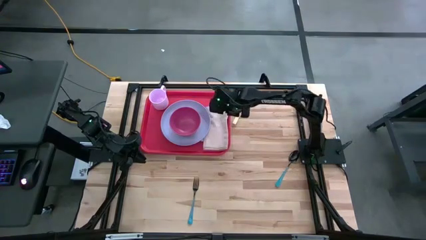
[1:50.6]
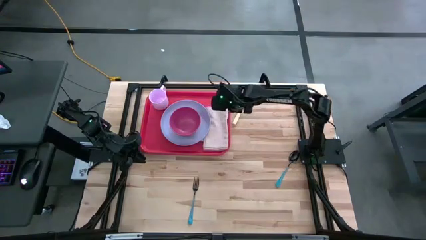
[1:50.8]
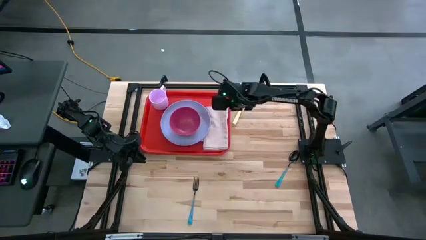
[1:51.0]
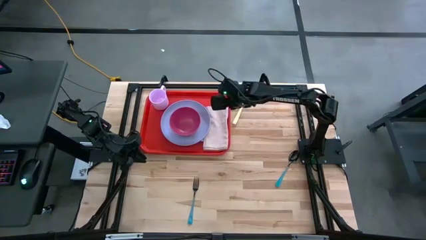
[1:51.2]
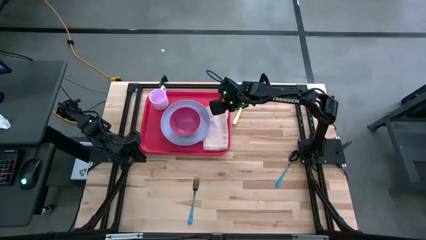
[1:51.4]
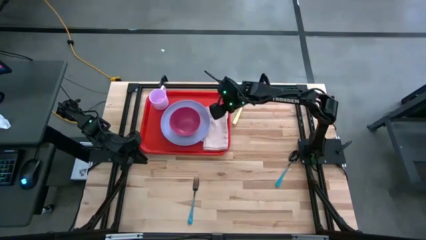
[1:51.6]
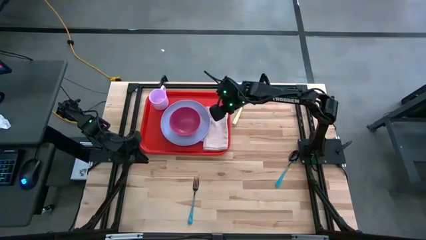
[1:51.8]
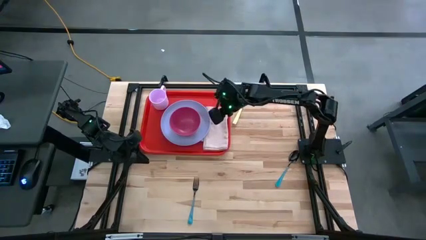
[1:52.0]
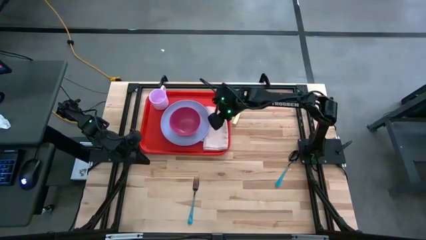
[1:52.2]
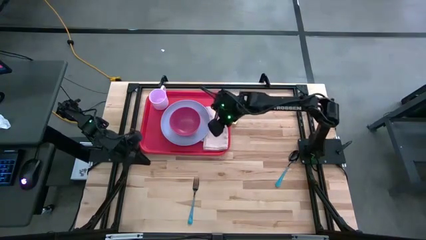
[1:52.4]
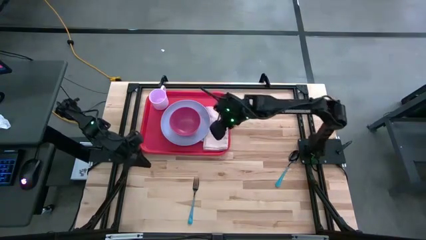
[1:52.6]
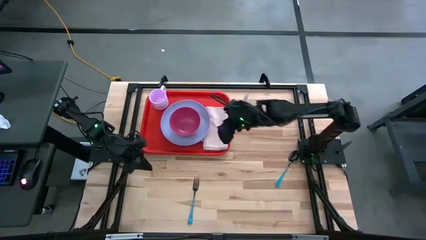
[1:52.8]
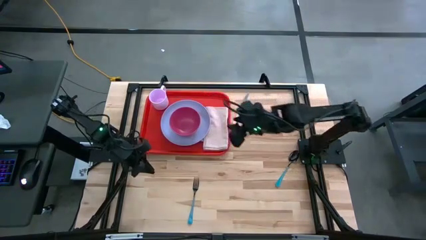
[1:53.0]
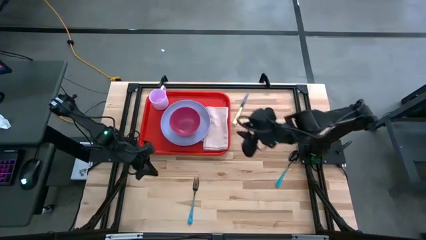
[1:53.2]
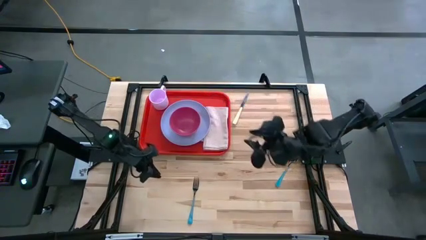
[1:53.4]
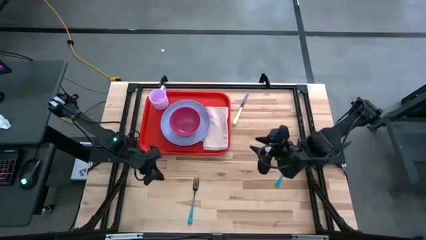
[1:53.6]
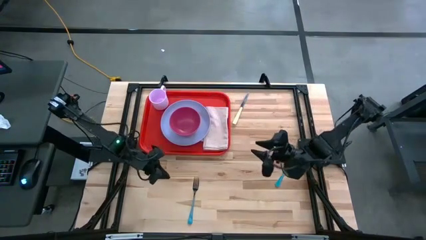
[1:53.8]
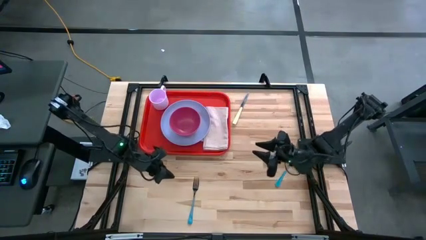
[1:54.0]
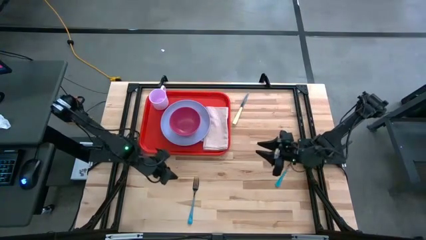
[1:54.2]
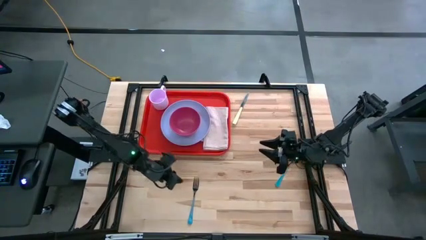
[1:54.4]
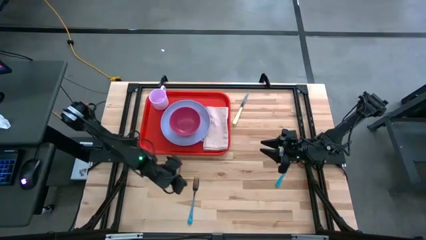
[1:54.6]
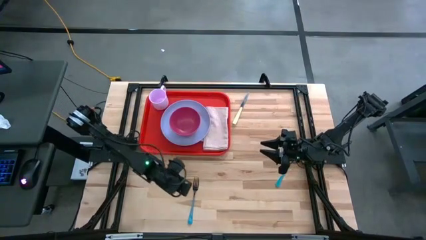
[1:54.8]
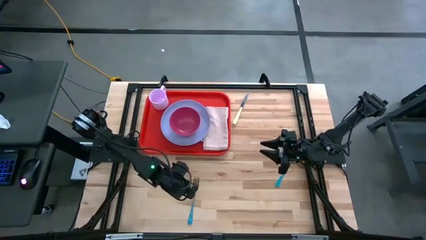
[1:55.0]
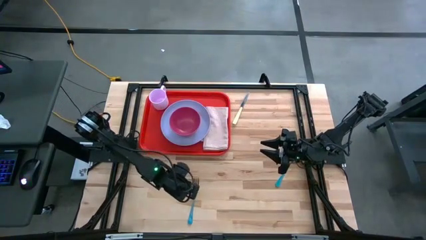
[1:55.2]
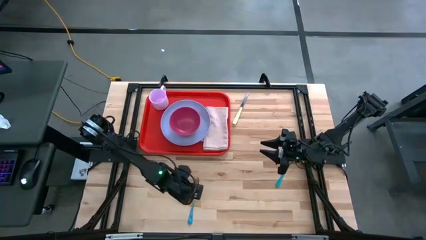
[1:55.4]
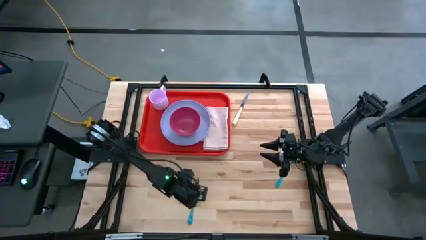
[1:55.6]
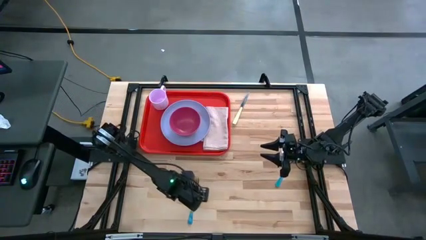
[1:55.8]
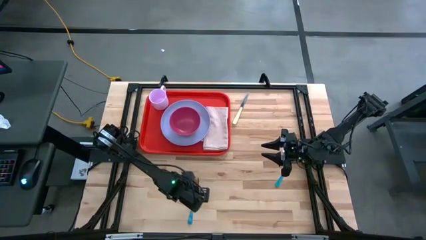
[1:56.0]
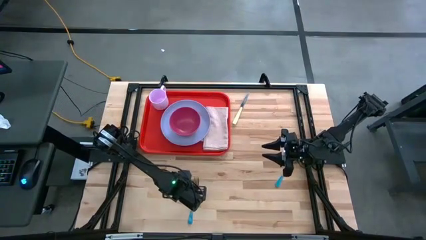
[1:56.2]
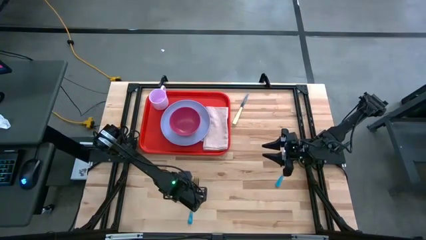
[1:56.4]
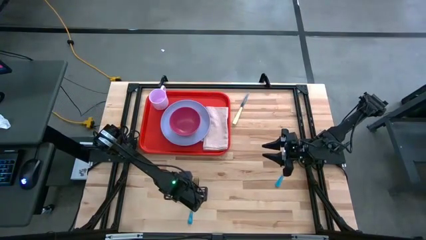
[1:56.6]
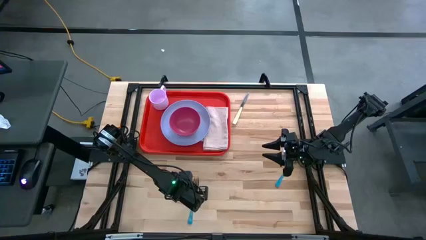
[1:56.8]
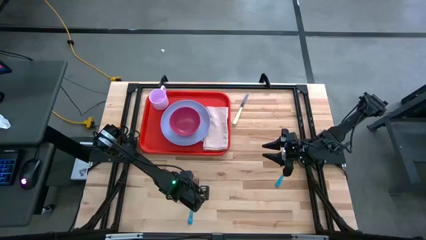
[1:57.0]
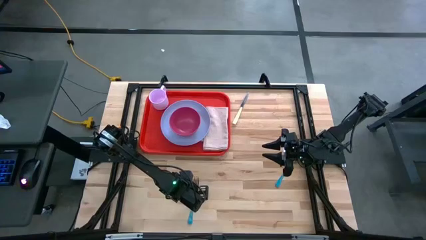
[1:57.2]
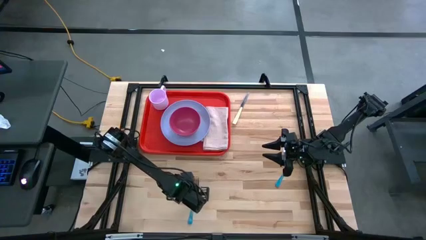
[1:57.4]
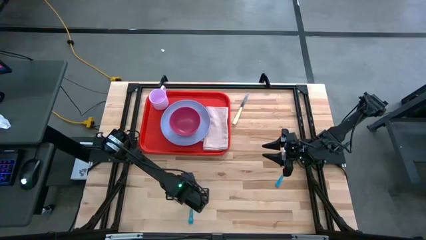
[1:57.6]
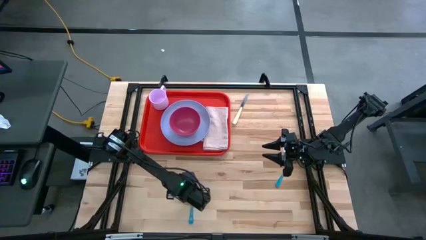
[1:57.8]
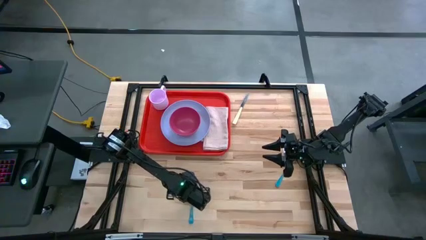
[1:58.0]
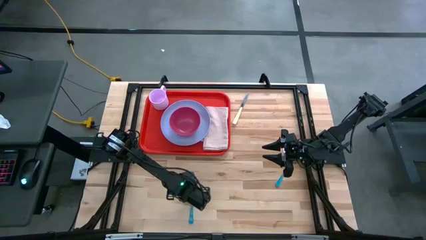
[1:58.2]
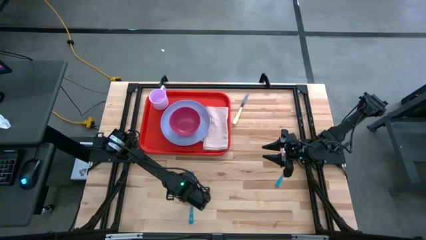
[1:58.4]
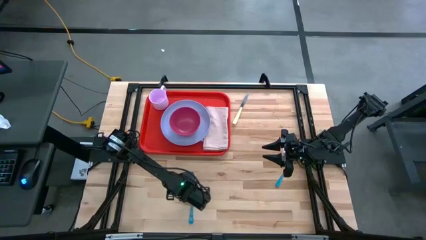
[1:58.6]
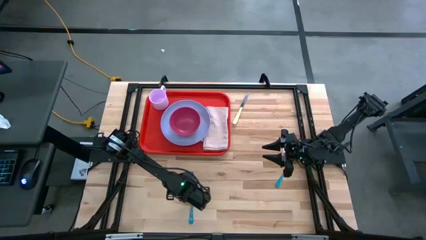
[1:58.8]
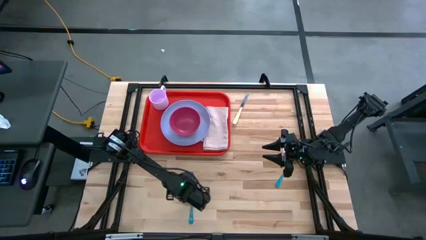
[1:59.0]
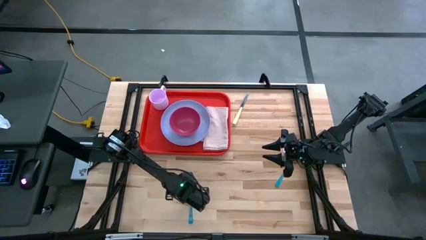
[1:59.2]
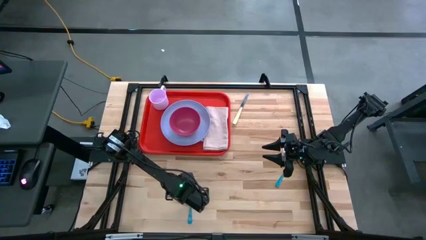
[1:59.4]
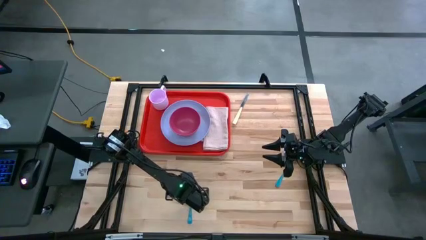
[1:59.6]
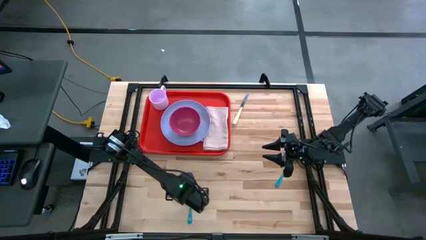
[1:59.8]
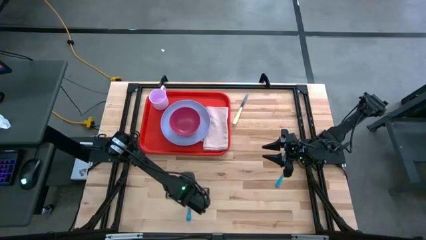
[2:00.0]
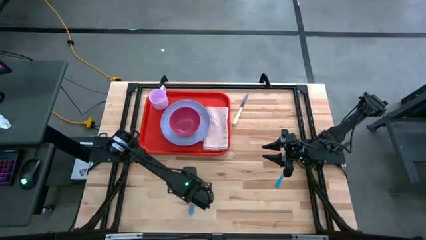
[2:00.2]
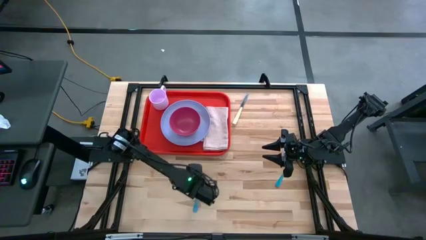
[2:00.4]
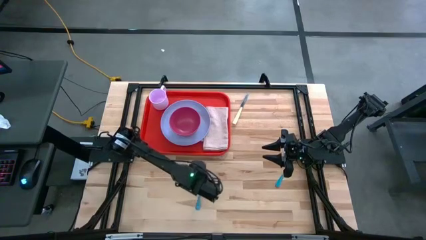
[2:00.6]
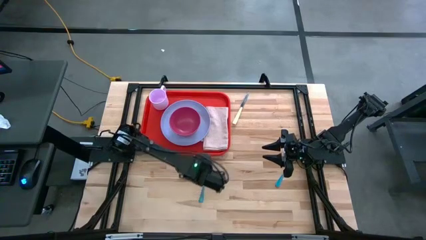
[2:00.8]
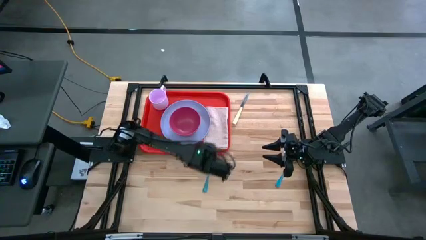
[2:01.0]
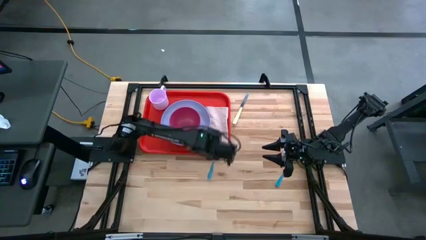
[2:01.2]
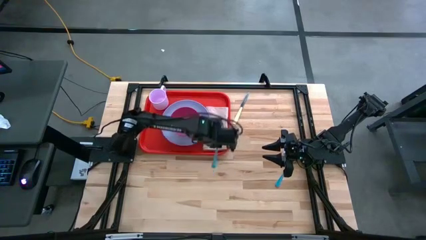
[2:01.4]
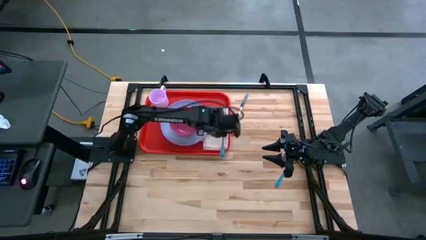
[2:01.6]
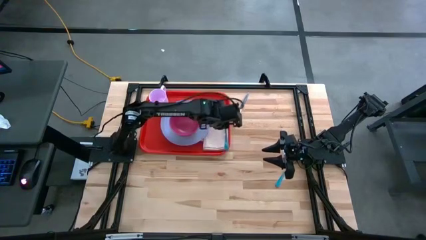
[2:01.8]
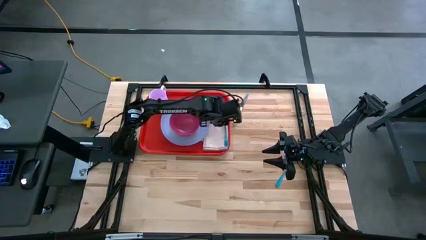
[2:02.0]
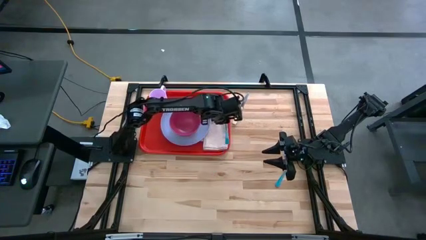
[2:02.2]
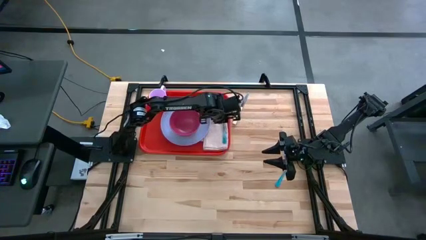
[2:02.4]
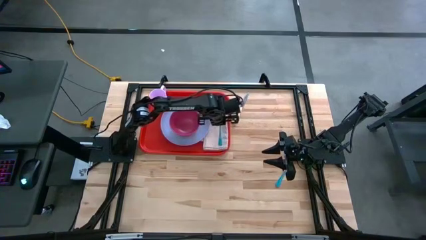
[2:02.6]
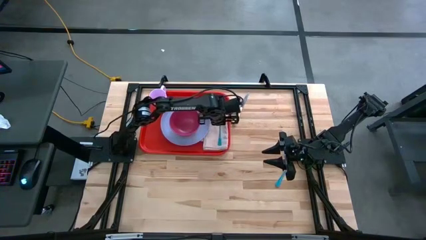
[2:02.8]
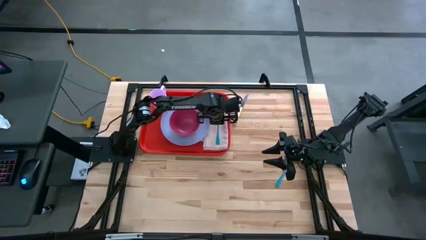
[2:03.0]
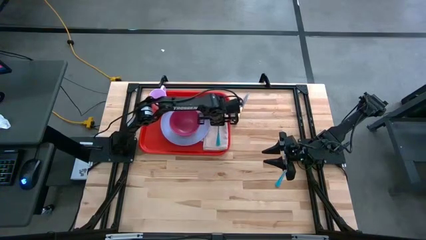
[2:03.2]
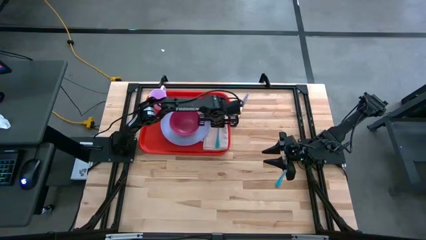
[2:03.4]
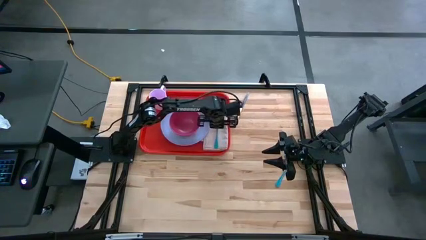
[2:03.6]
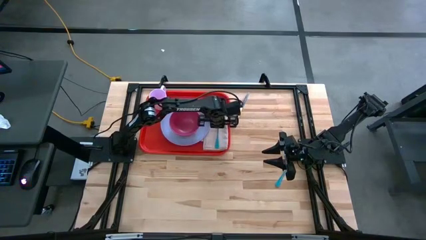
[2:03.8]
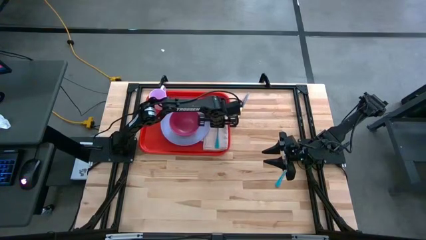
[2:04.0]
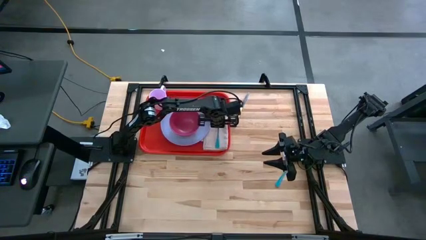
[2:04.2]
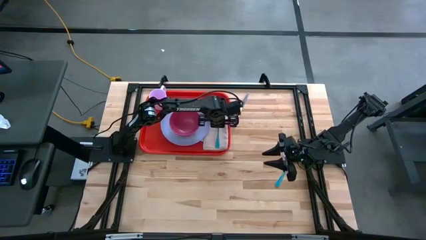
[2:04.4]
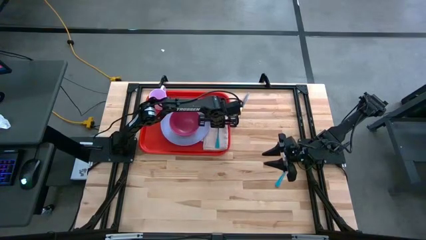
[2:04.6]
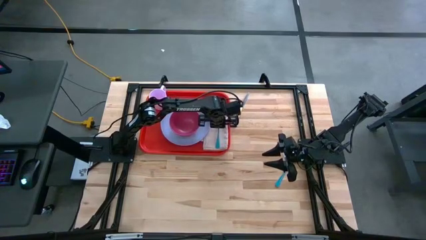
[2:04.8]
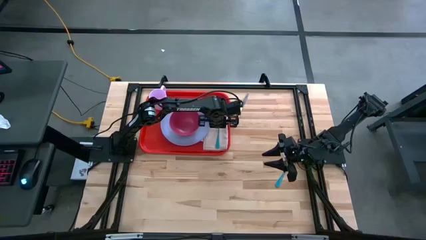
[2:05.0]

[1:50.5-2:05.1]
Task: Set up tray
Put the green fork on the brown napkin
